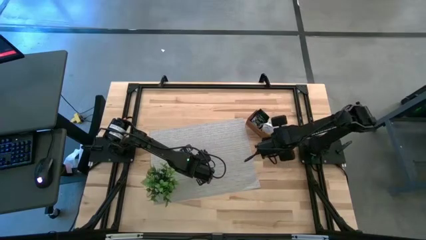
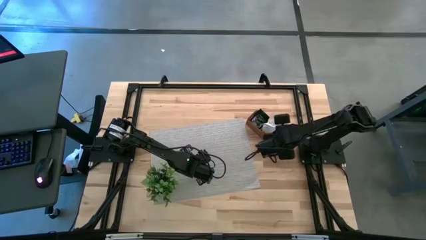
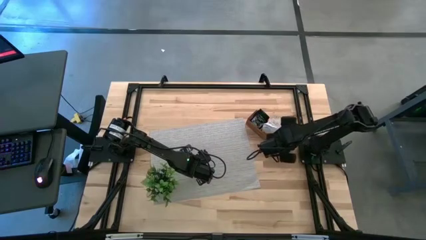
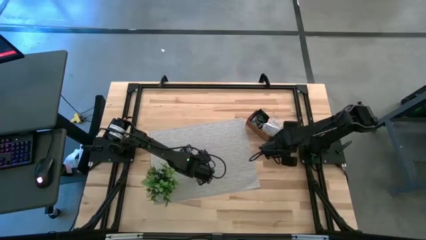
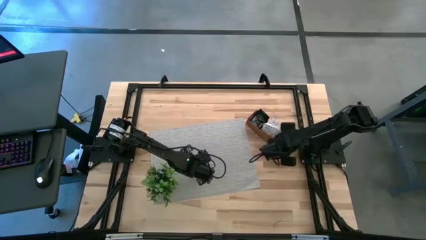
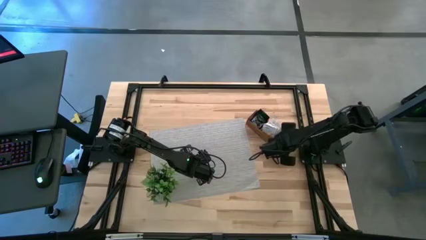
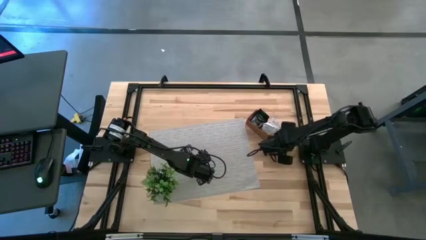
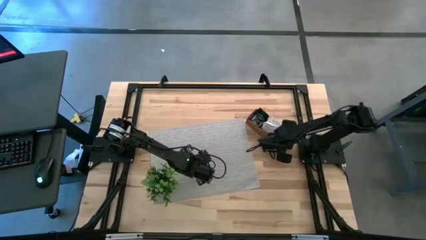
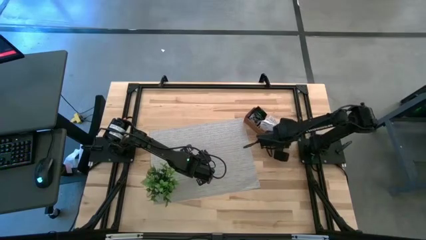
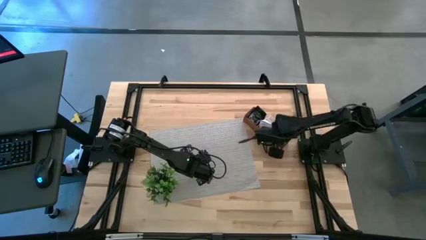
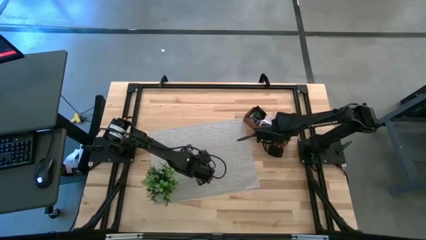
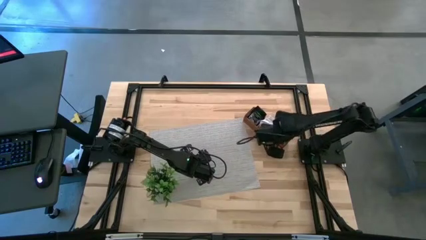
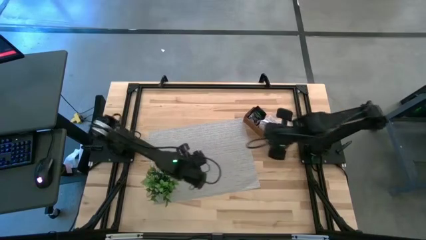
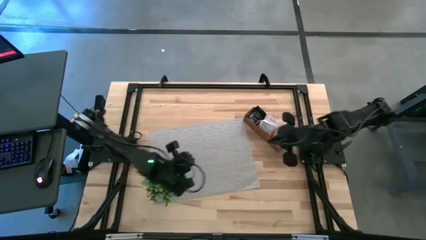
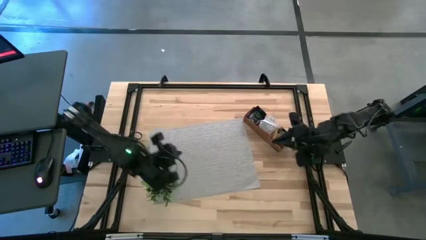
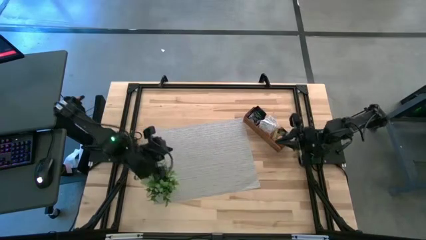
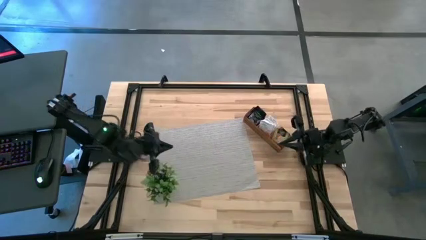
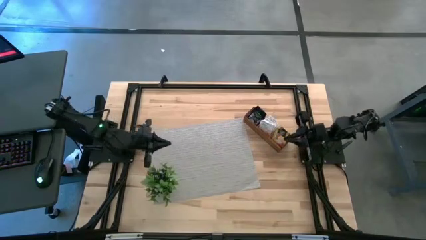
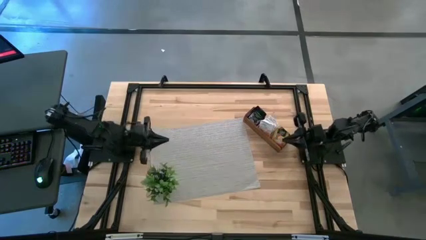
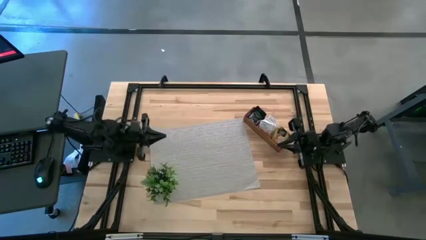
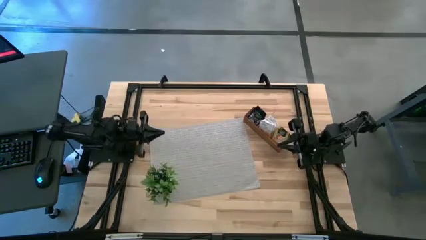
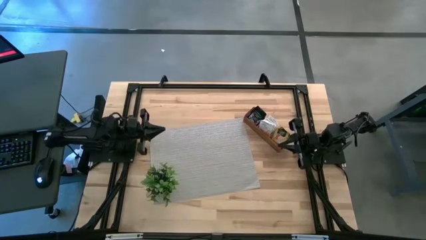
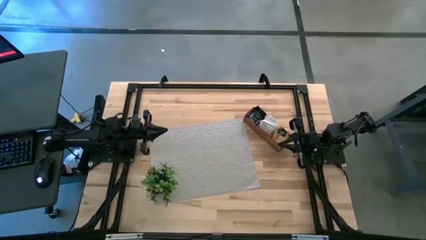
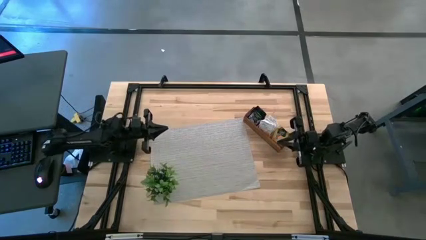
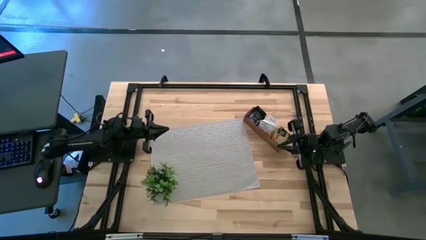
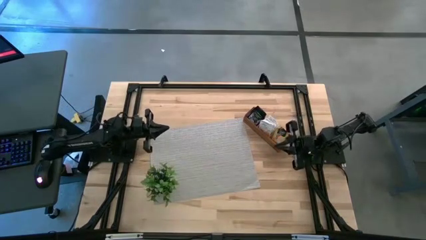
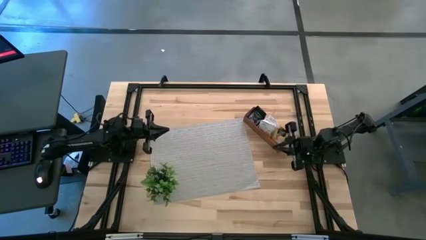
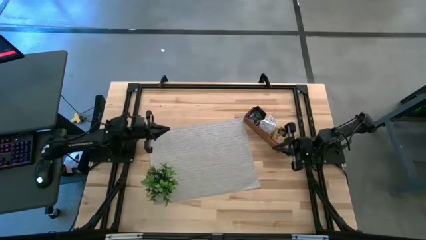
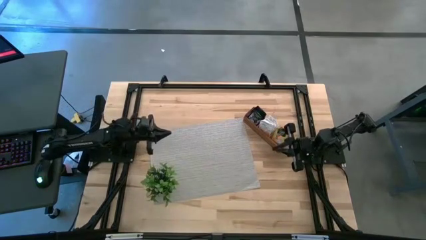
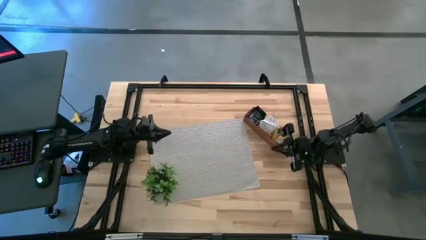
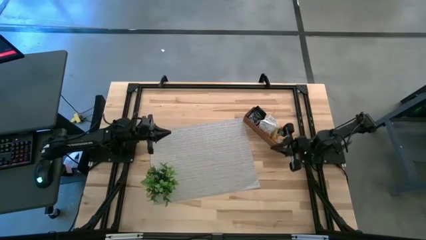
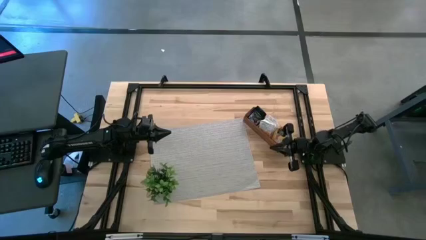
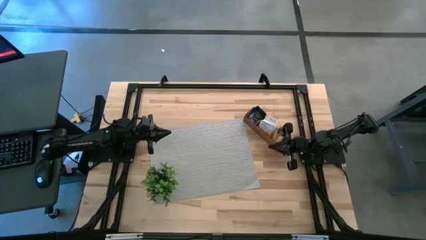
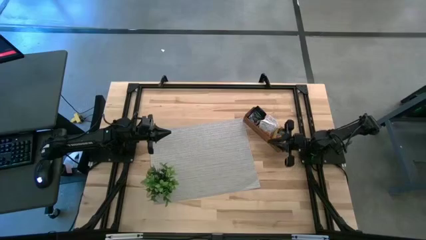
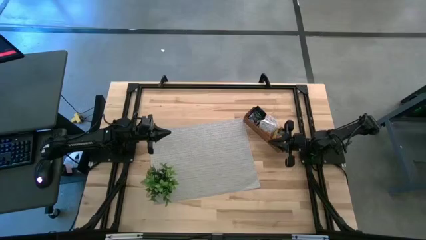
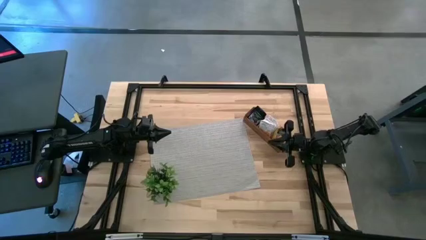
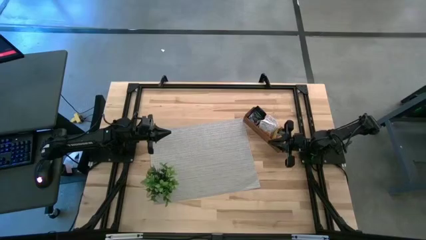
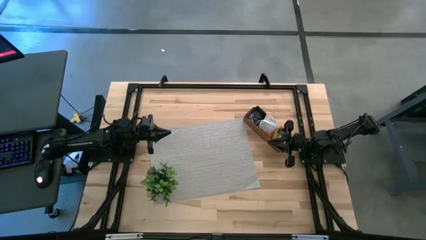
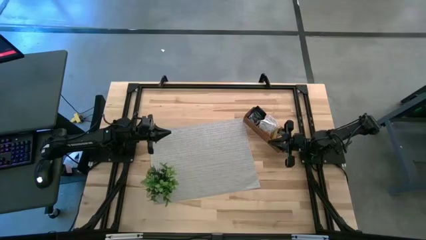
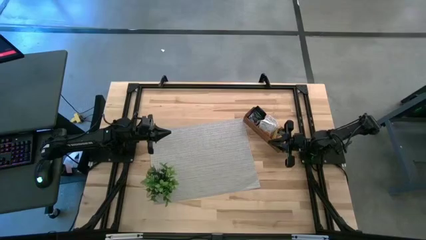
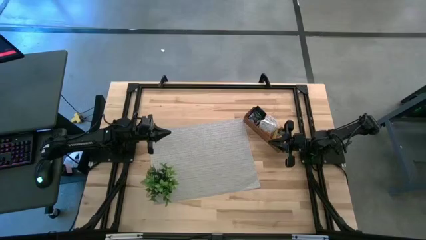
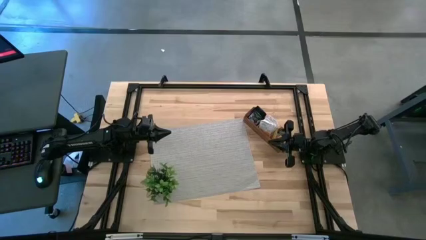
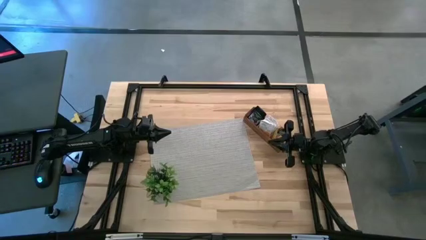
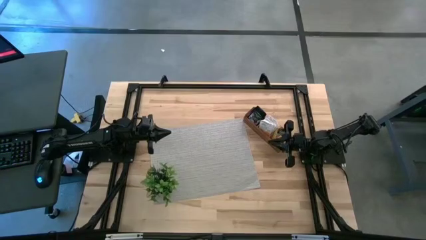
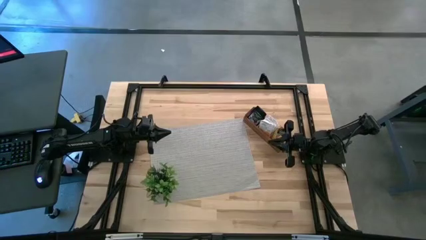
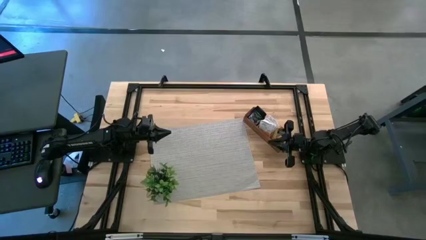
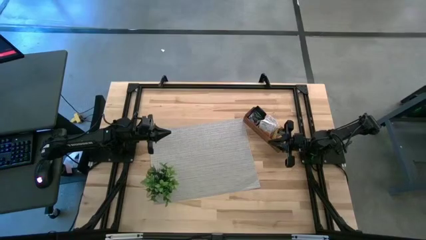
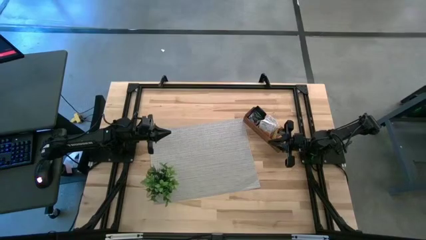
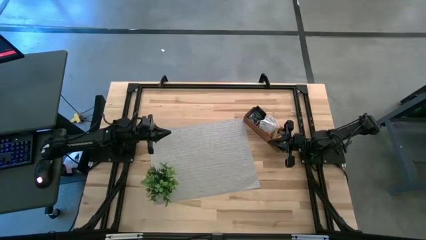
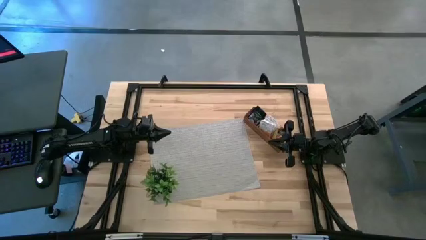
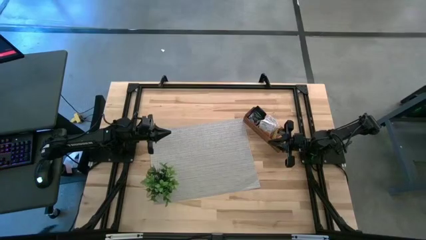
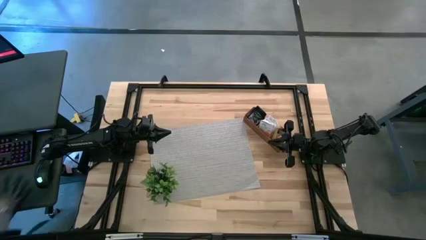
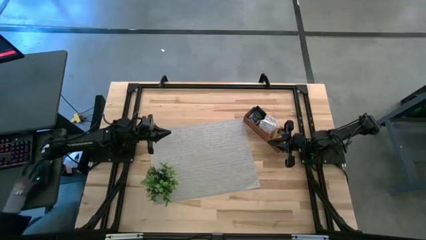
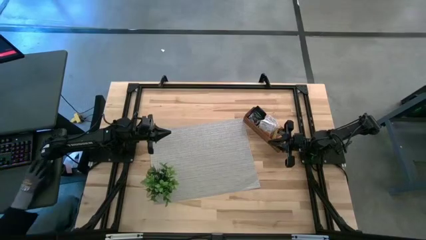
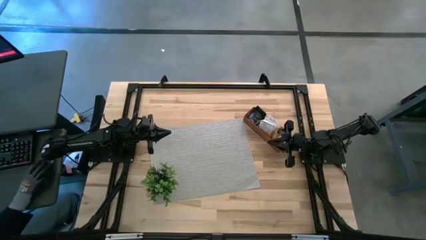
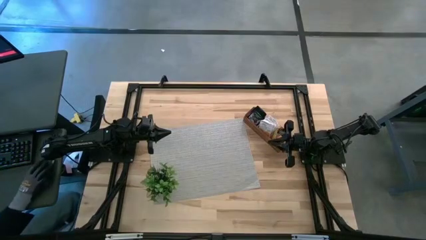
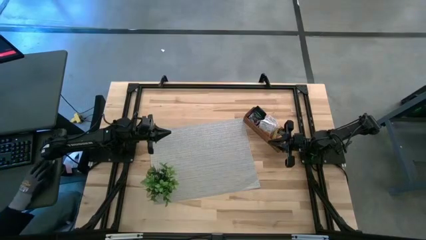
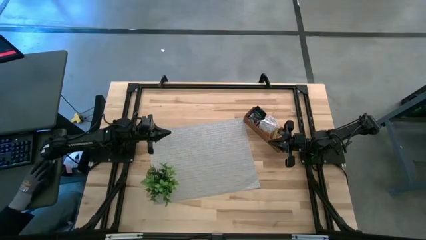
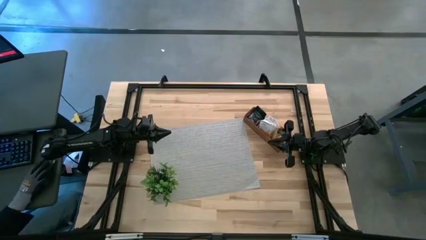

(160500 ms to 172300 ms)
Task: Pick & Place Tea
Return to Home Position

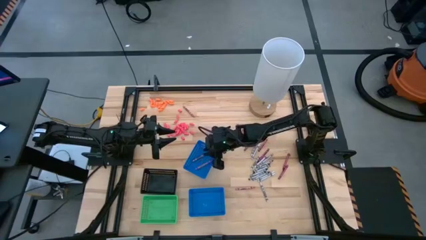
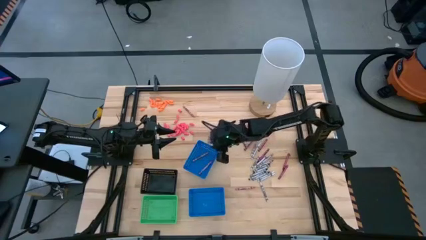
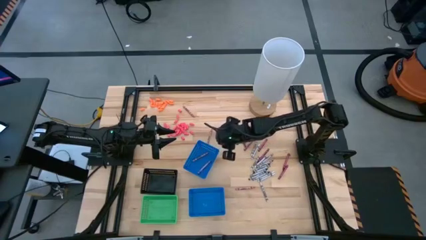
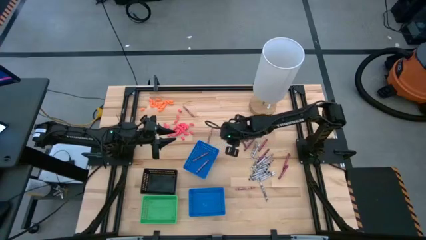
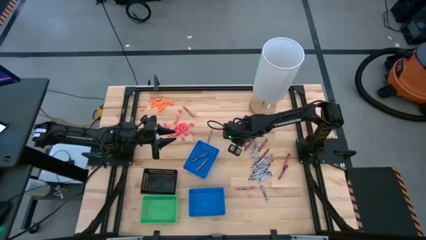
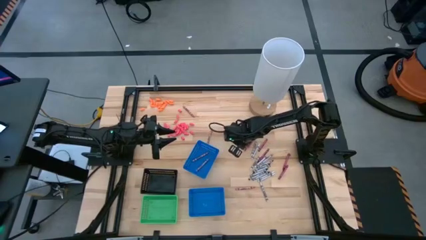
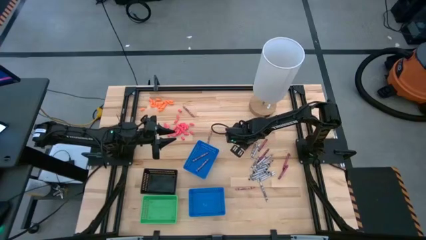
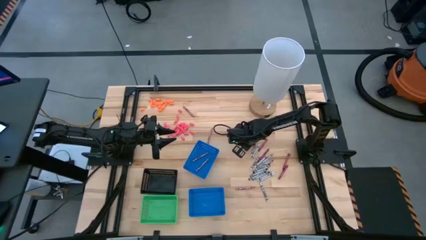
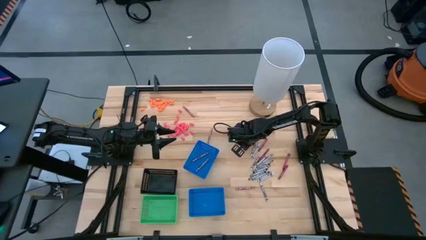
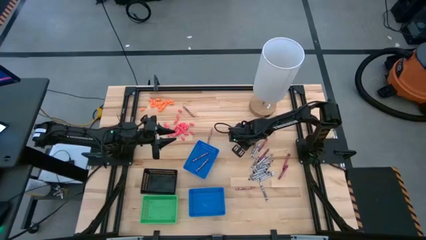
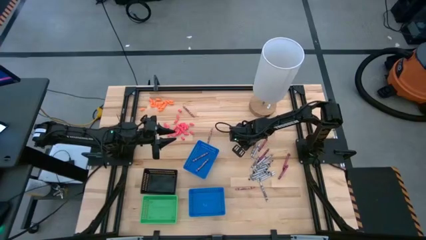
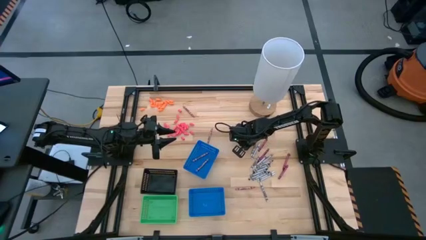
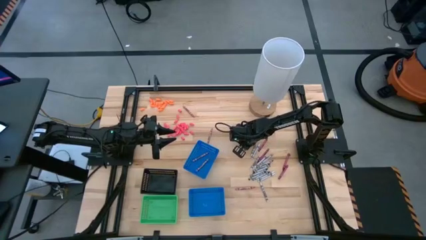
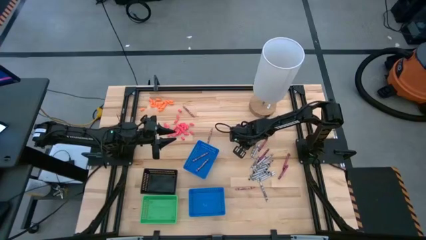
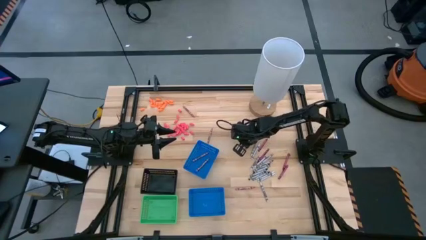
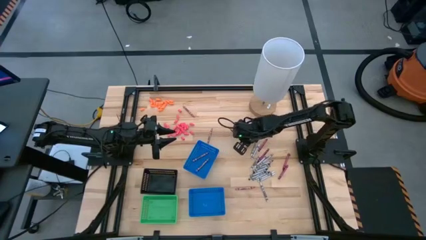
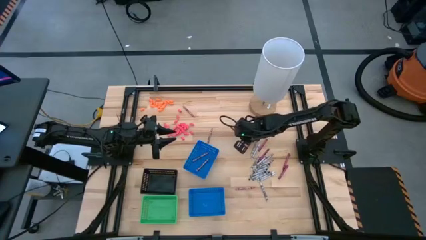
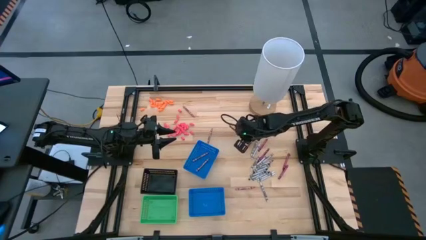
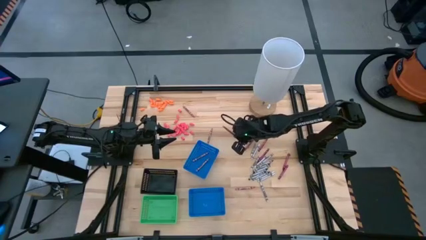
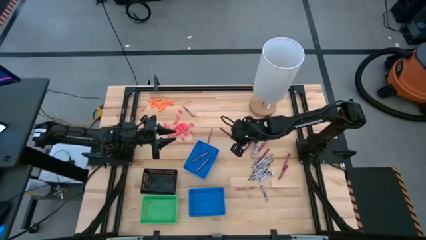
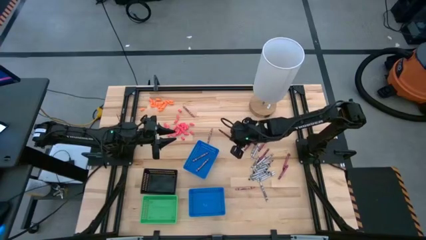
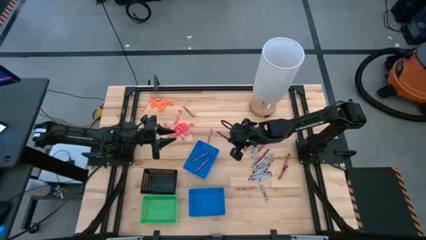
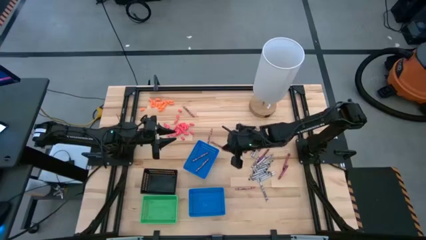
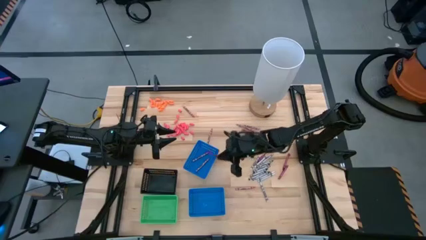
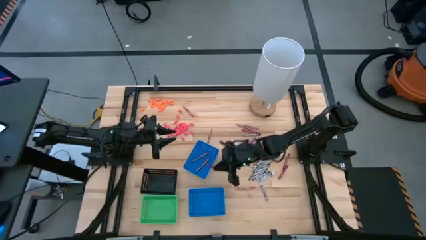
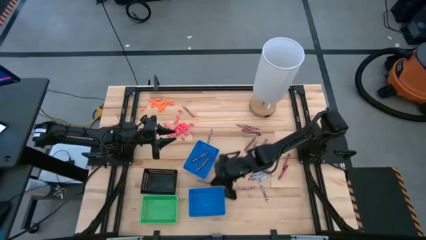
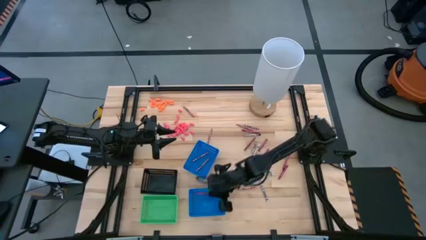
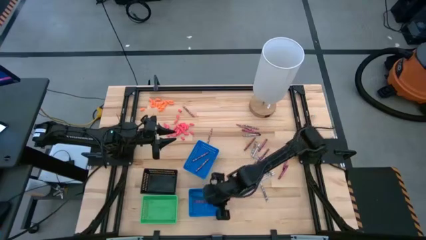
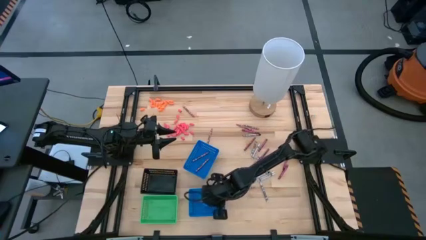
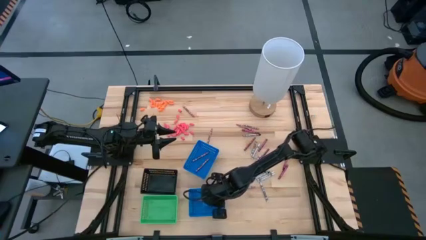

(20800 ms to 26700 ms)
Task: Sort crayons
Put the violet crayon into the bottom blue bin
